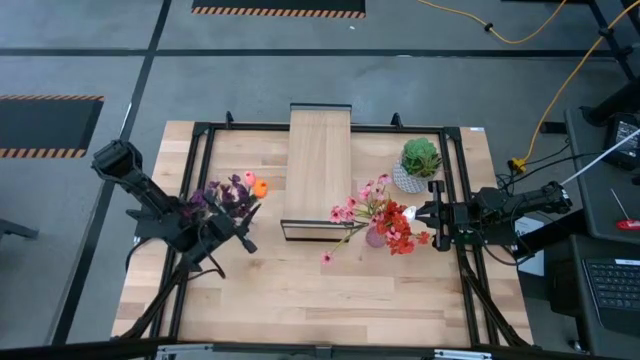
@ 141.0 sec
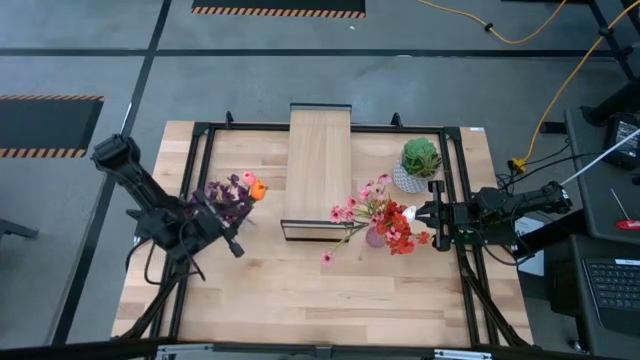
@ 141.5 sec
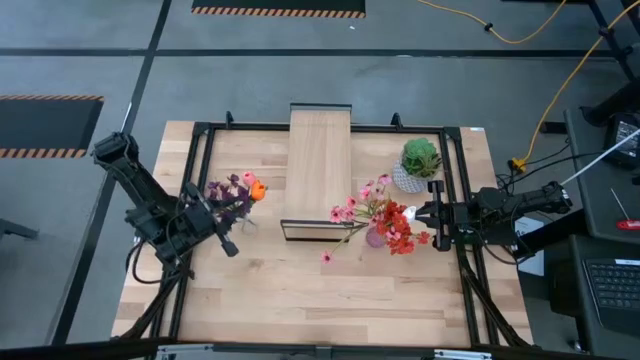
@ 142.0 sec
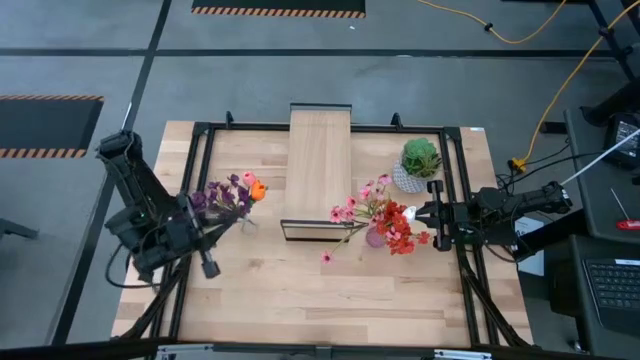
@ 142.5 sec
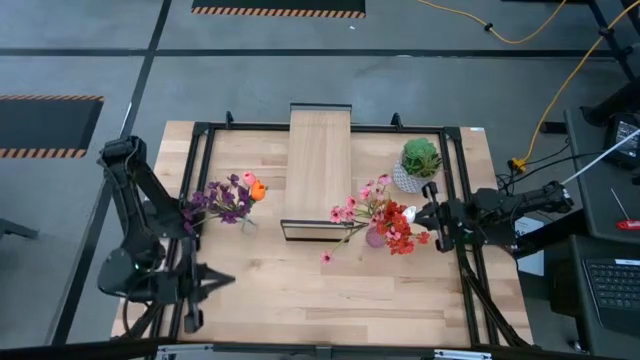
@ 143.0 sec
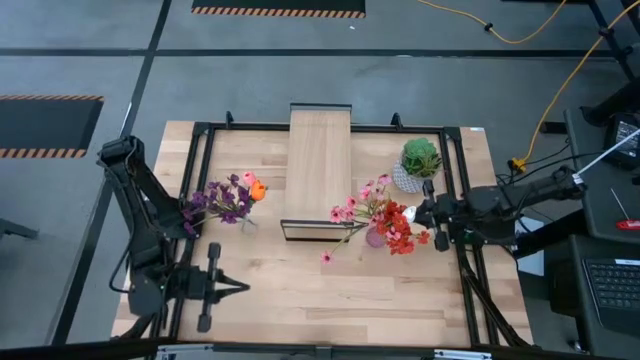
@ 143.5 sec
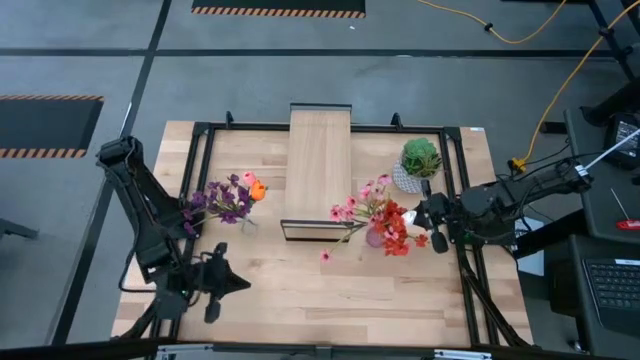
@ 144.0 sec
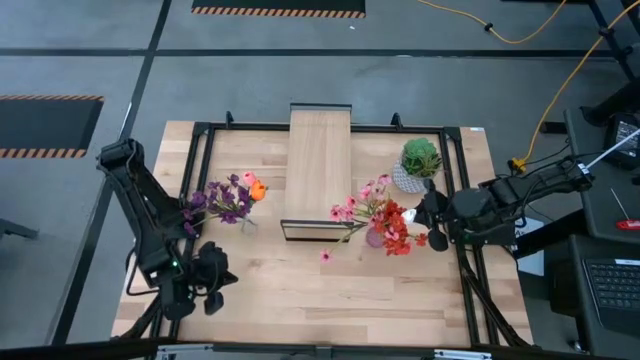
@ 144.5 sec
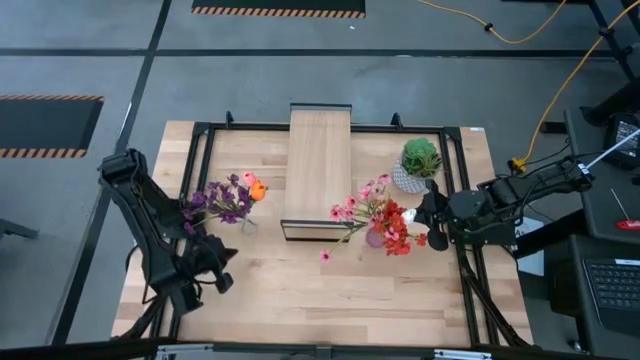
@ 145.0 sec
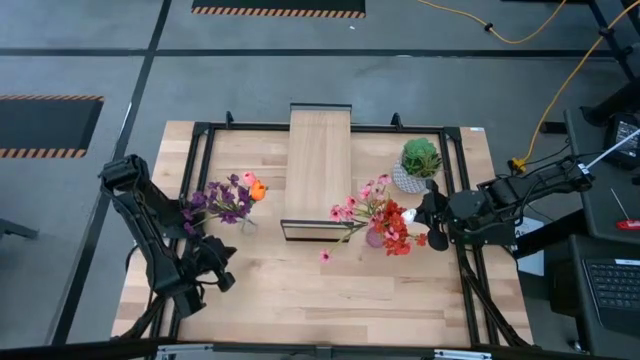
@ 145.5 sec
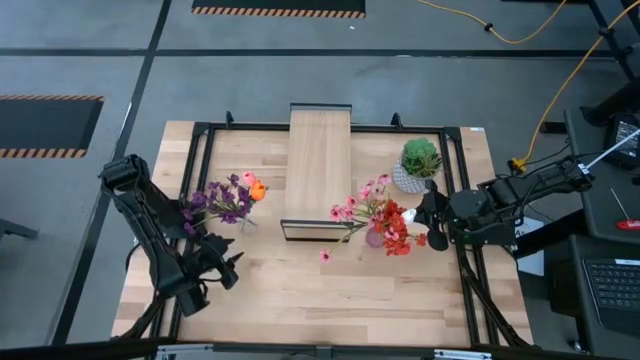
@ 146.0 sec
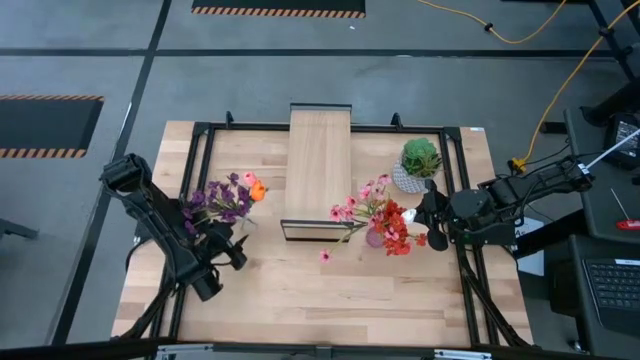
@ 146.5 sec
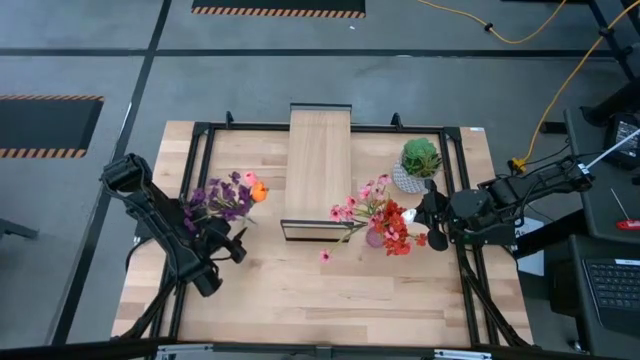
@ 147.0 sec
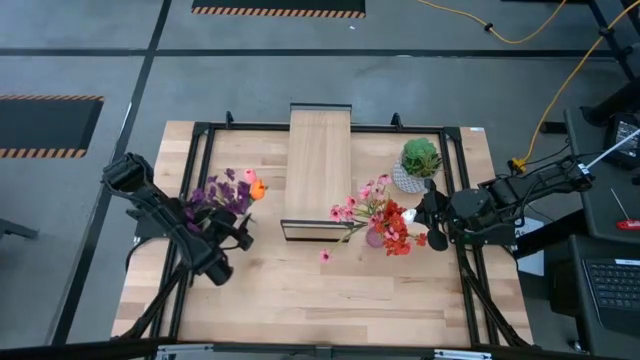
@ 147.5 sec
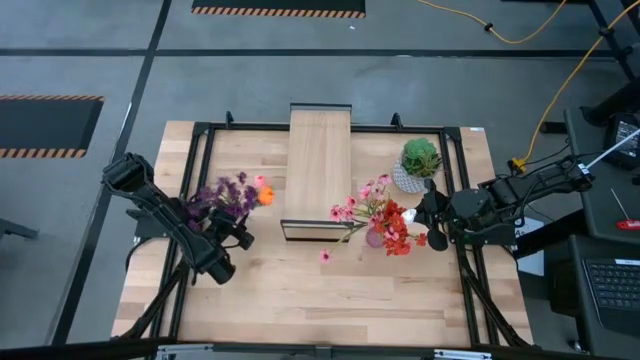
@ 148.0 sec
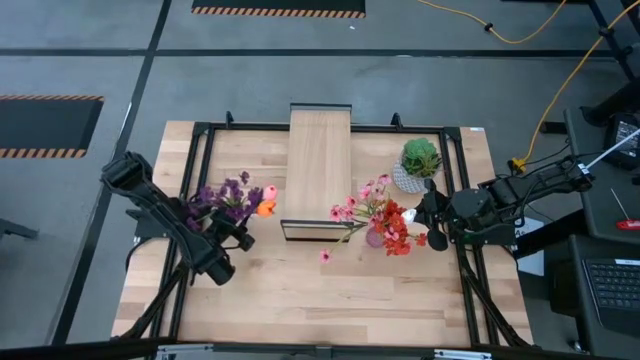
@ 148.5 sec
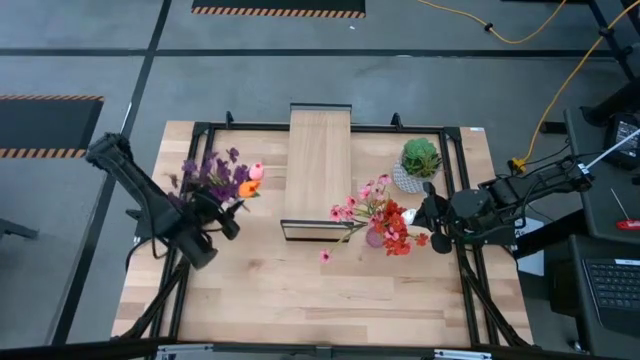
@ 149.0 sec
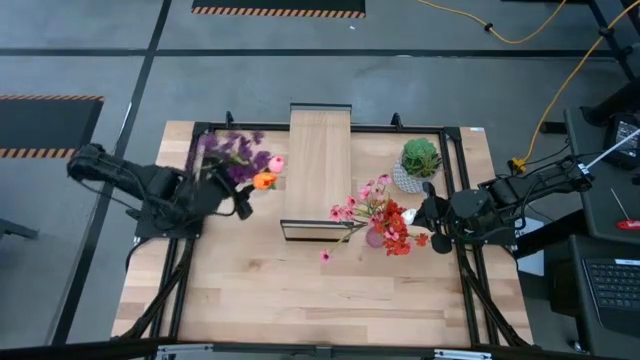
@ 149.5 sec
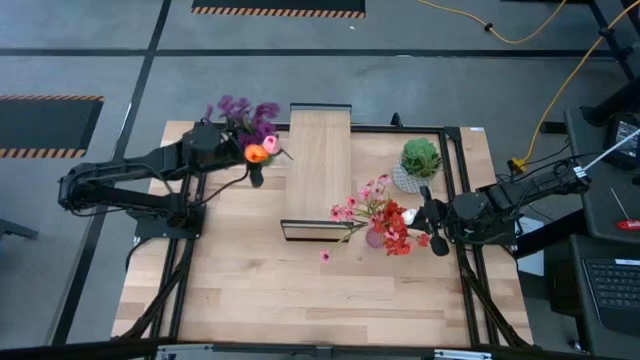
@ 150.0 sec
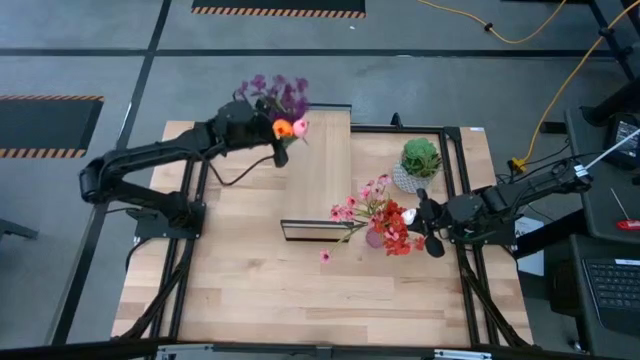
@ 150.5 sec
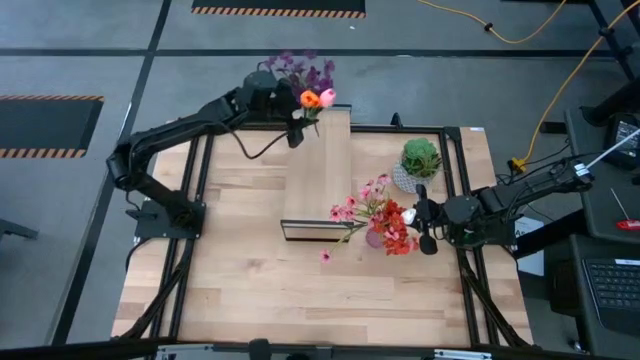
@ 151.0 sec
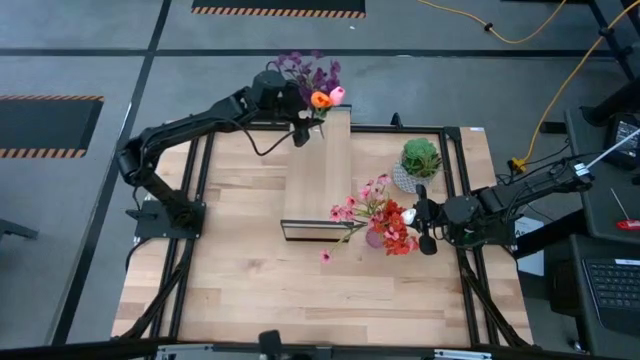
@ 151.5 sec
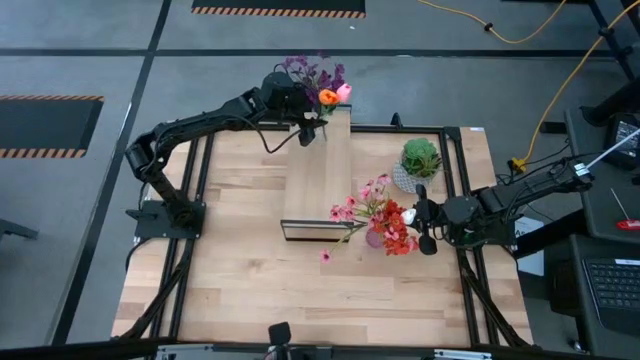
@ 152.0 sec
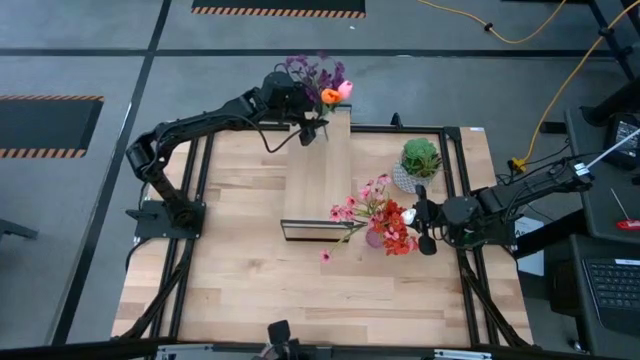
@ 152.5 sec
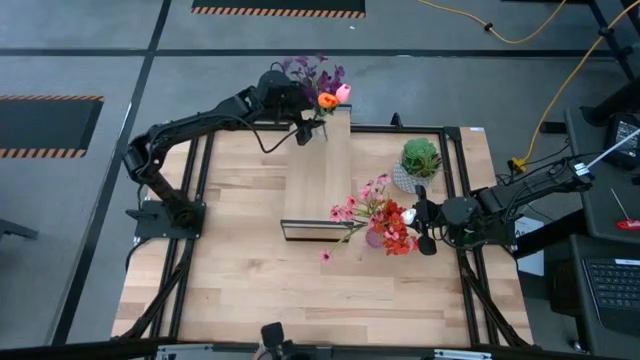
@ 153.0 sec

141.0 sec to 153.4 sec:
Task: Pick and place flowers into a vace then onto a shelf
Put the transparent vase with flowers onto the shelf

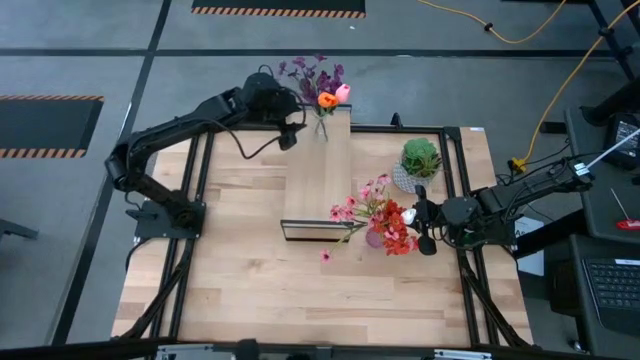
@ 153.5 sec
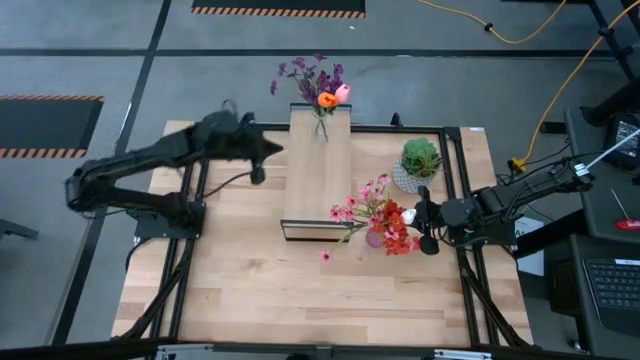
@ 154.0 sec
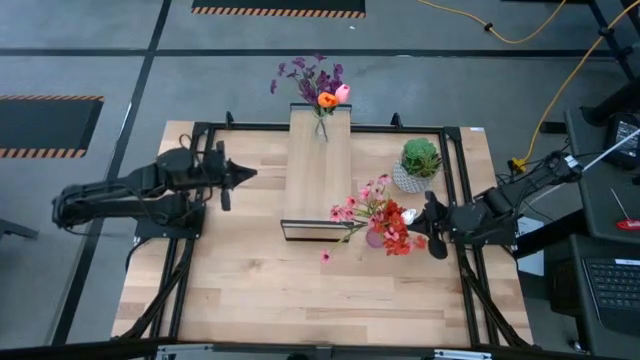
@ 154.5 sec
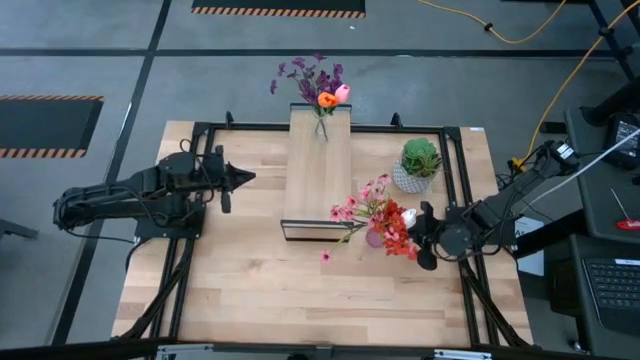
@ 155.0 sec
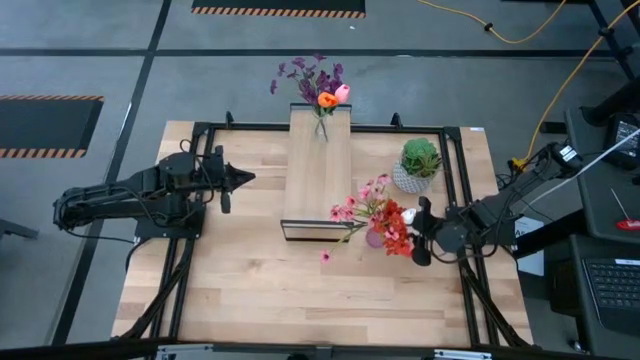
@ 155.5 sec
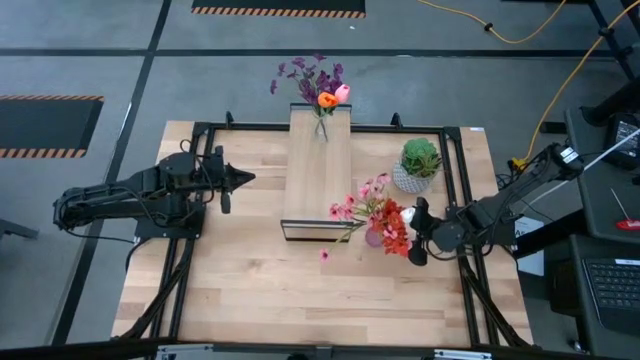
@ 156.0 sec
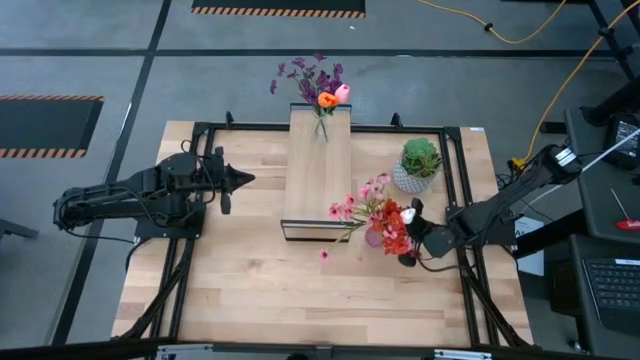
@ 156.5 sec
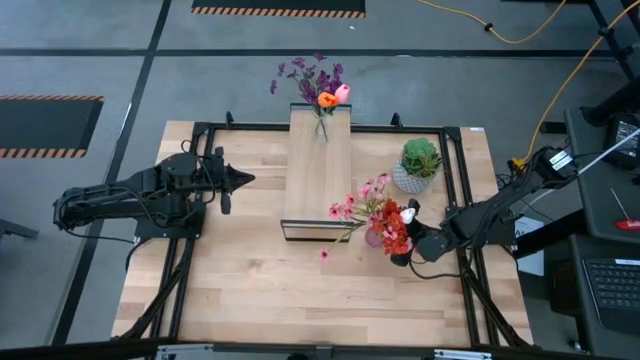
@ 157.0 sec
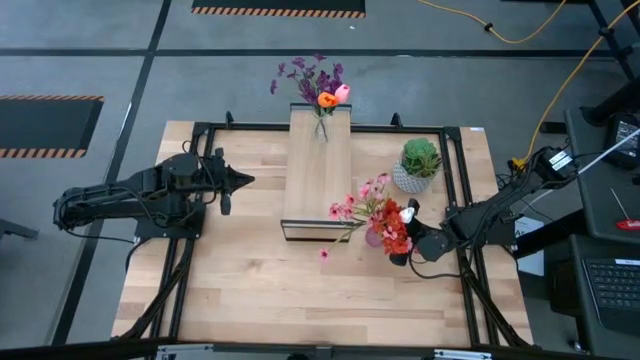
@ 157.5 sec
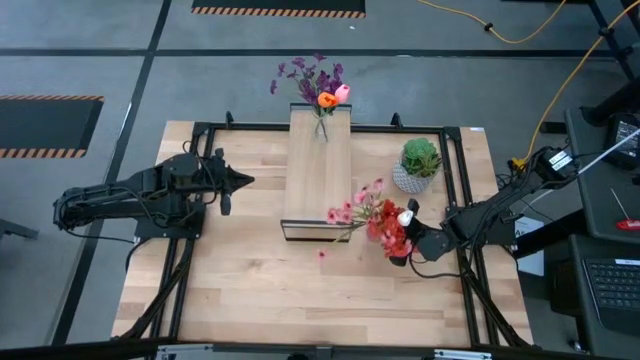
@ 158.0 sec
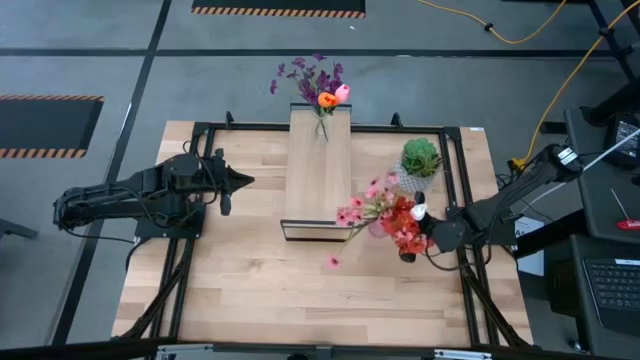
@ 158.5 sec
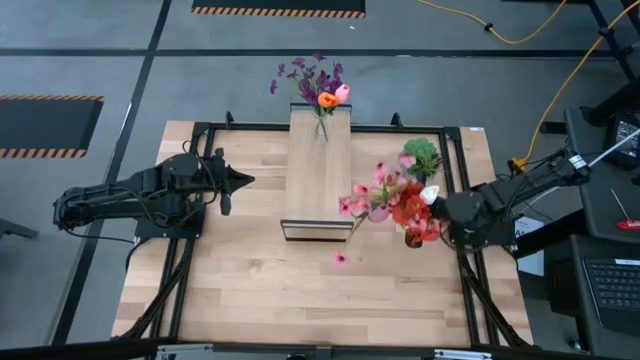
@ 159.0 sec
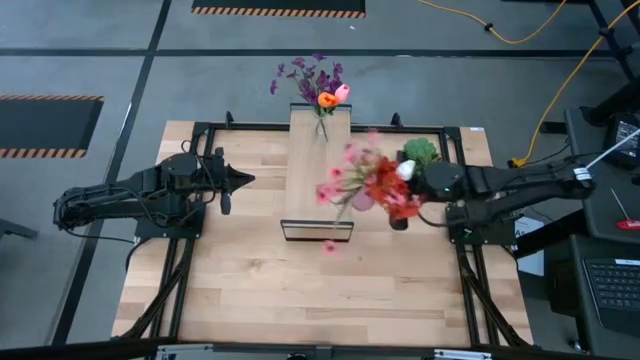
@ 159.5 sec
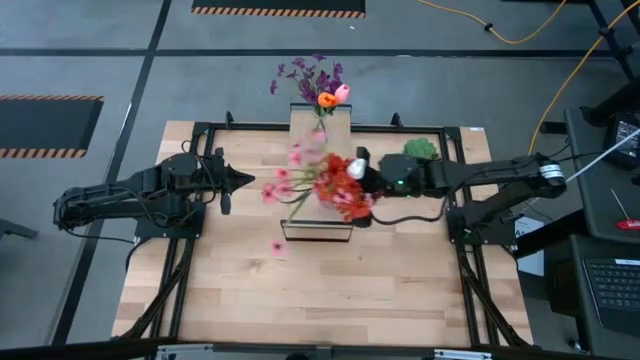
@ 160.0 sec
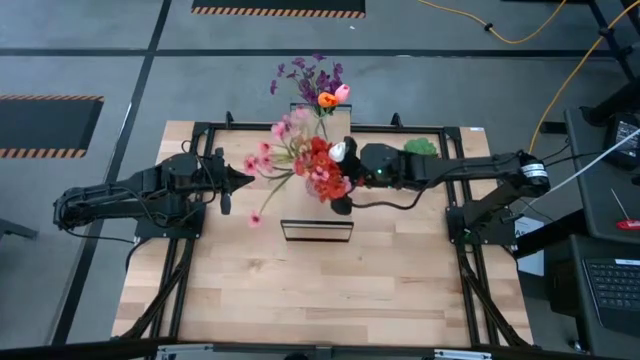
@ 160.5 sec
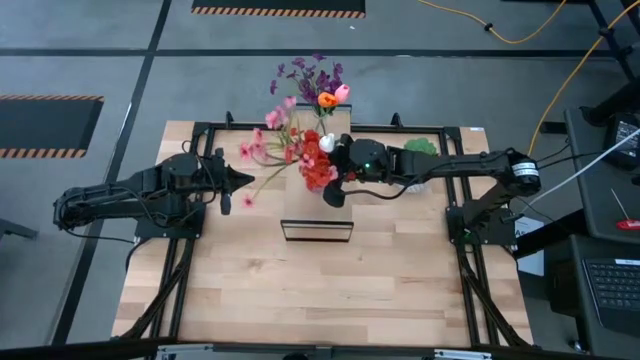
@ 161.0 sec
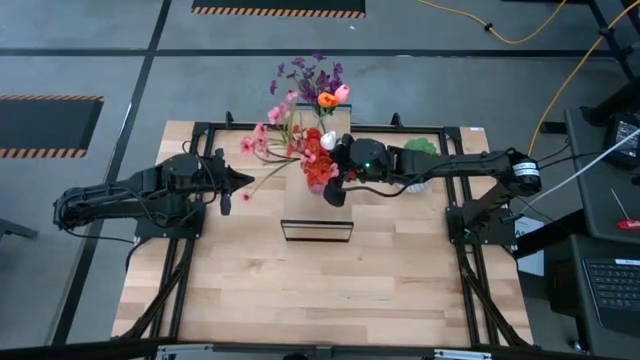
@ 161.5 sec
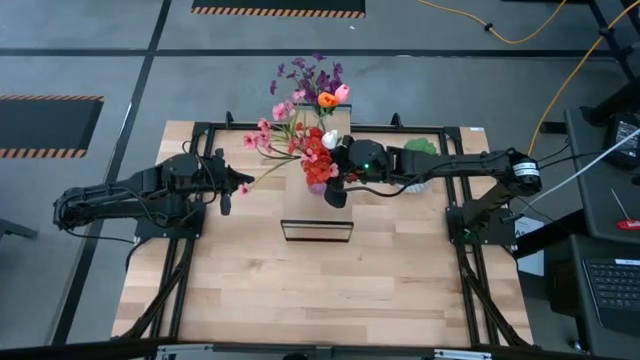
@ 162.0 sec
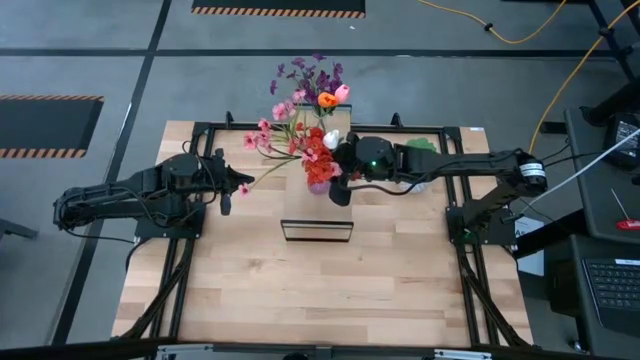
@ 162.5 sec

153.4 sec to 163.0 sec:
Put the purple vase with flowers onto the shelf

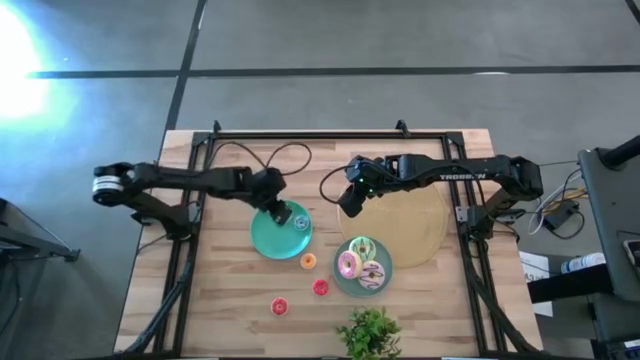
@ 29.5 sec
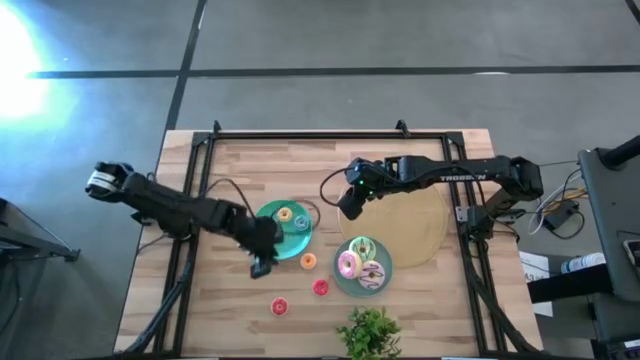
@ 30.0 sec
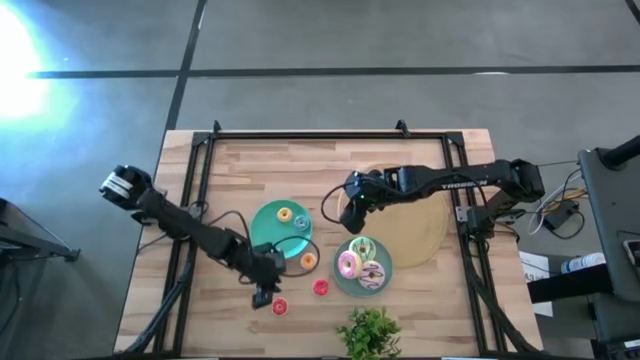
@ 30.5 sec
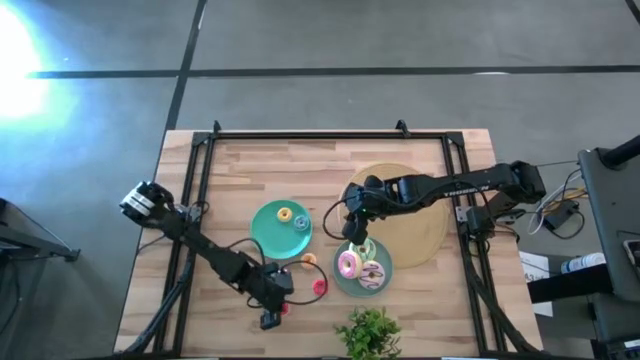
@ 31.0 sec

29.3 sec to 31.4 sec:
Task: Pick & Place donuts
Put the small orange donut on the green plate
